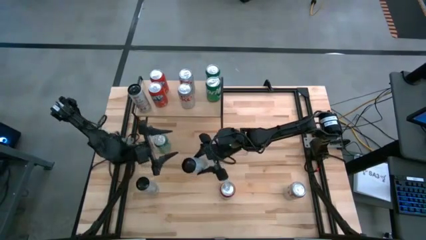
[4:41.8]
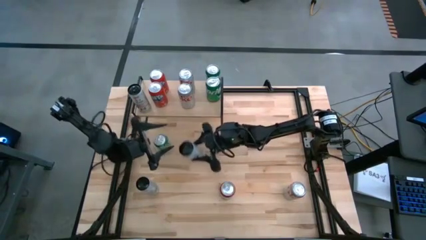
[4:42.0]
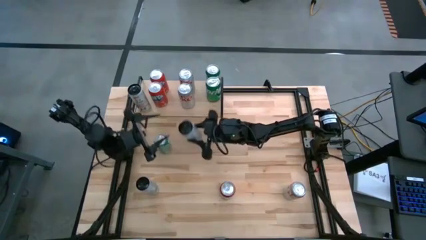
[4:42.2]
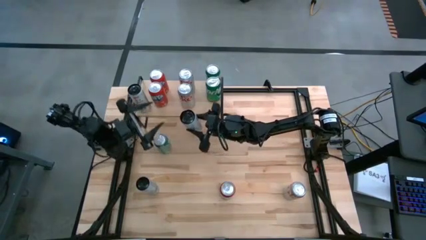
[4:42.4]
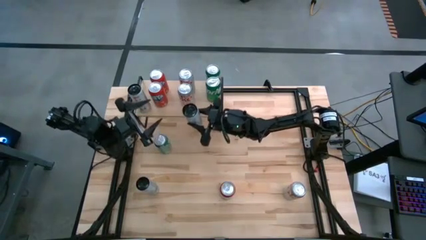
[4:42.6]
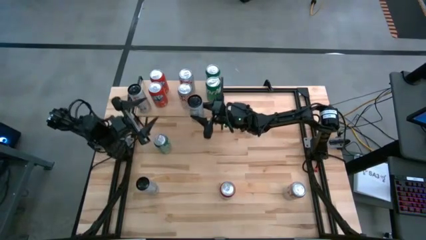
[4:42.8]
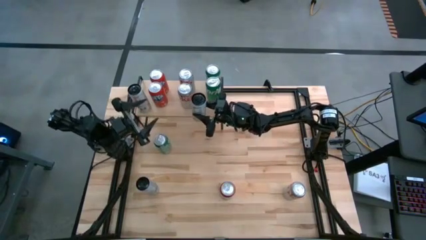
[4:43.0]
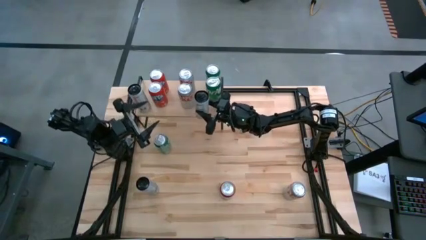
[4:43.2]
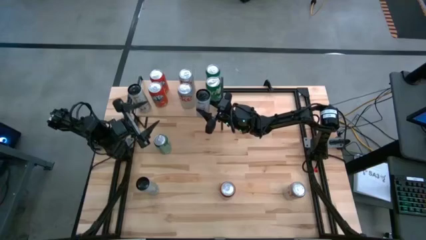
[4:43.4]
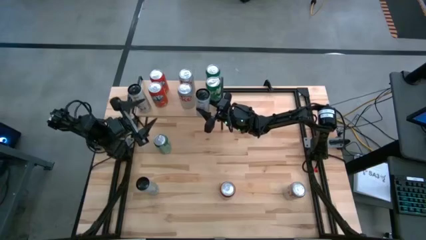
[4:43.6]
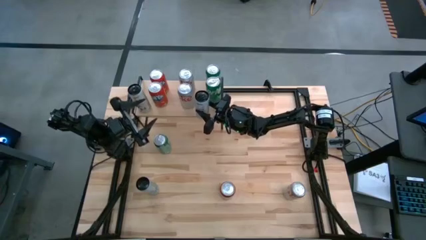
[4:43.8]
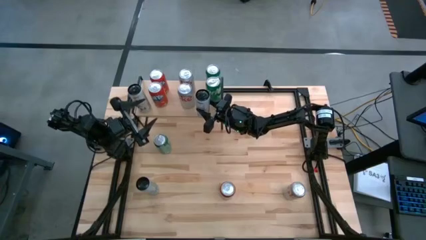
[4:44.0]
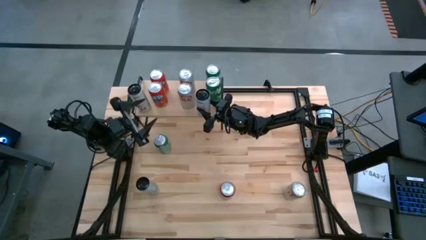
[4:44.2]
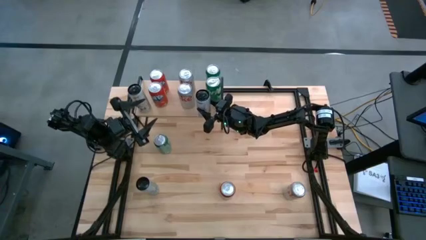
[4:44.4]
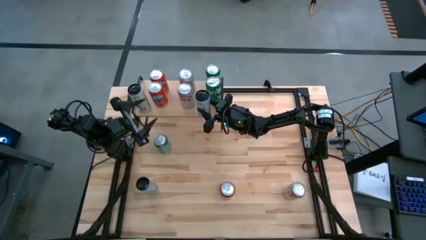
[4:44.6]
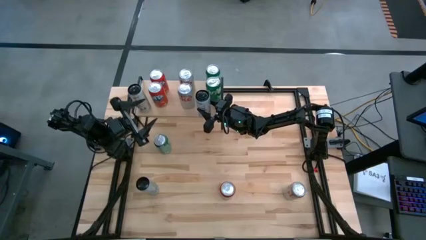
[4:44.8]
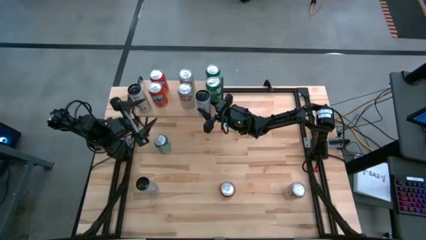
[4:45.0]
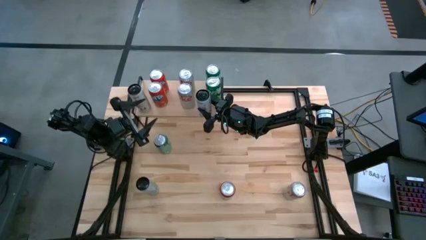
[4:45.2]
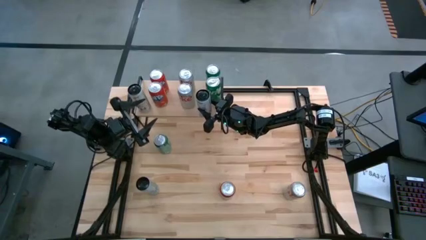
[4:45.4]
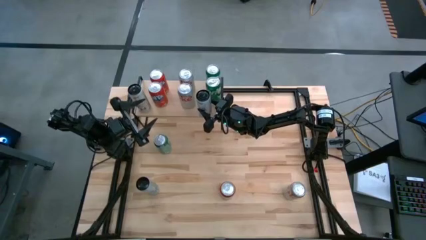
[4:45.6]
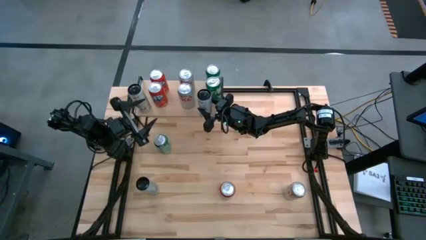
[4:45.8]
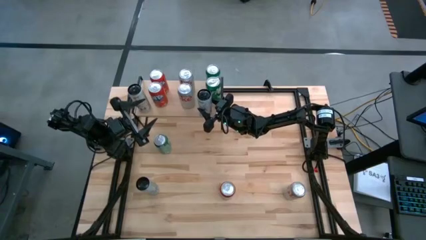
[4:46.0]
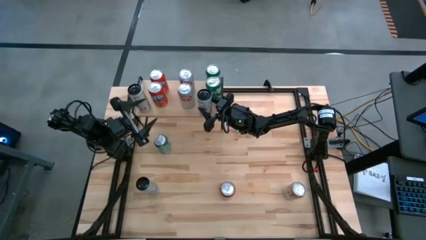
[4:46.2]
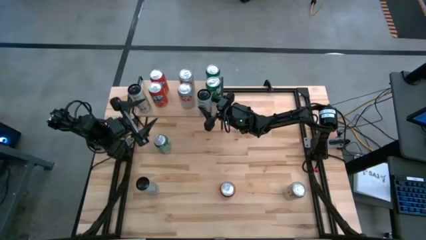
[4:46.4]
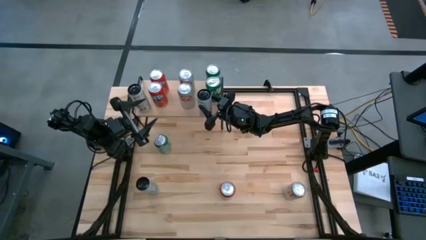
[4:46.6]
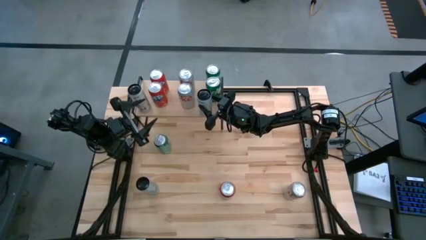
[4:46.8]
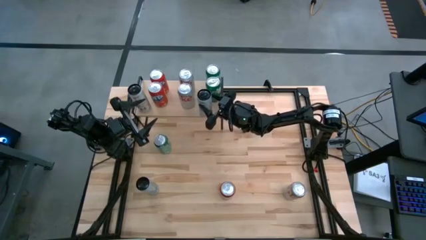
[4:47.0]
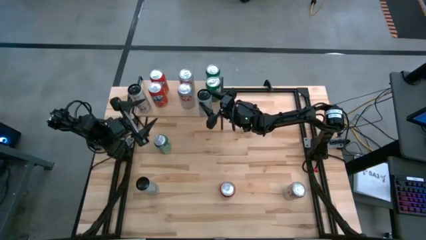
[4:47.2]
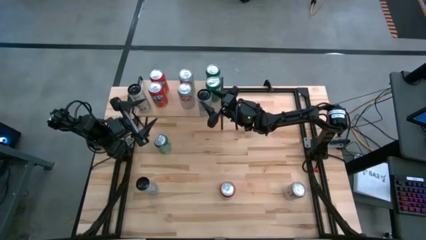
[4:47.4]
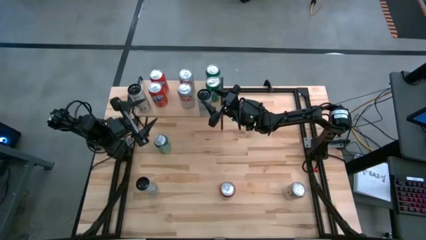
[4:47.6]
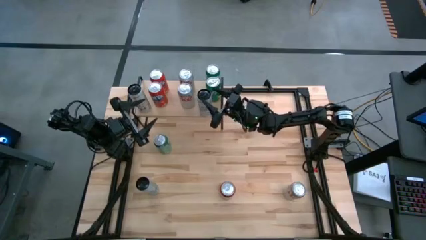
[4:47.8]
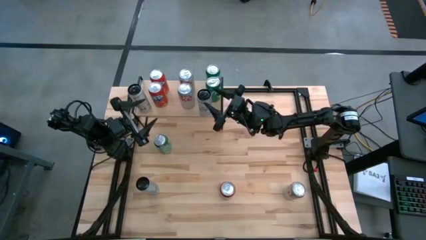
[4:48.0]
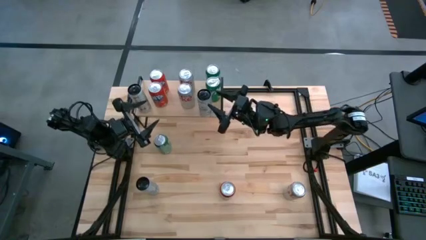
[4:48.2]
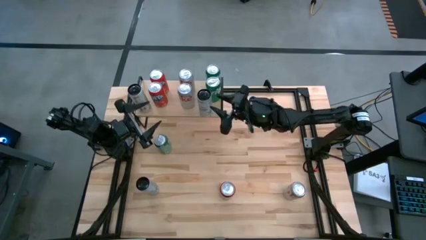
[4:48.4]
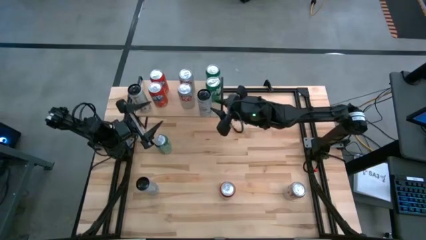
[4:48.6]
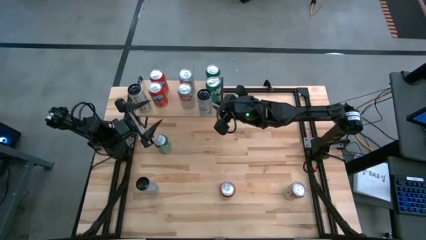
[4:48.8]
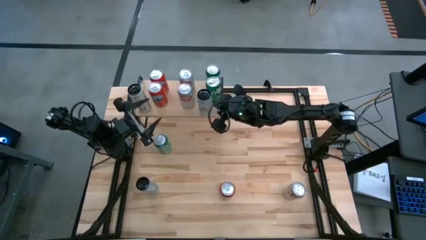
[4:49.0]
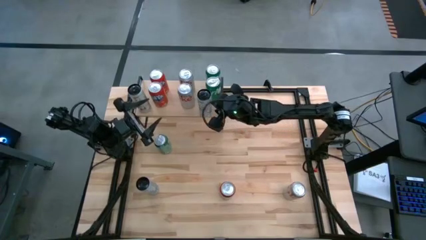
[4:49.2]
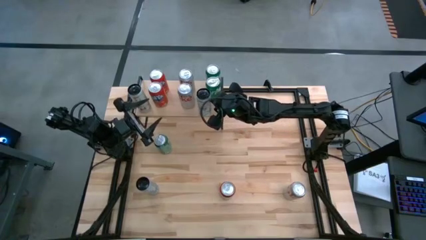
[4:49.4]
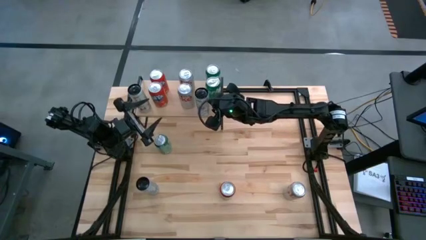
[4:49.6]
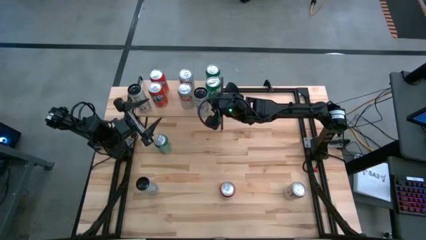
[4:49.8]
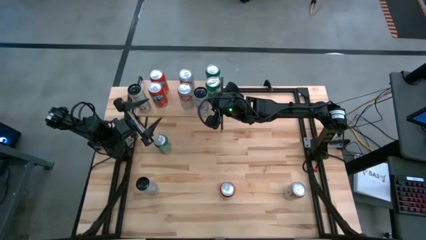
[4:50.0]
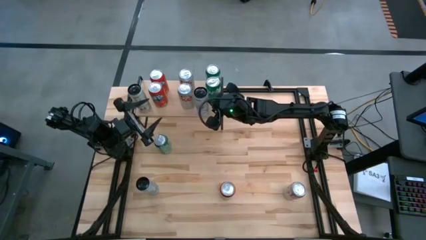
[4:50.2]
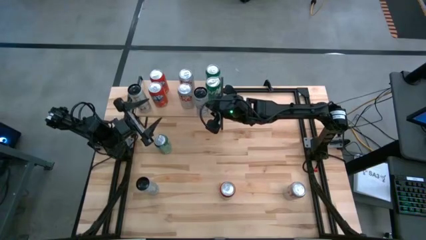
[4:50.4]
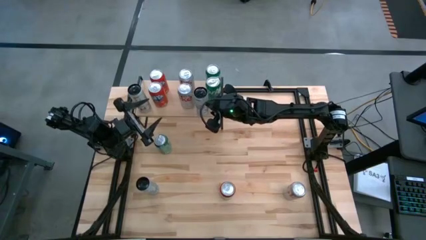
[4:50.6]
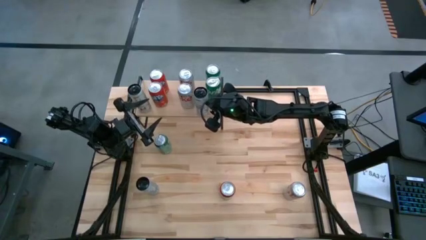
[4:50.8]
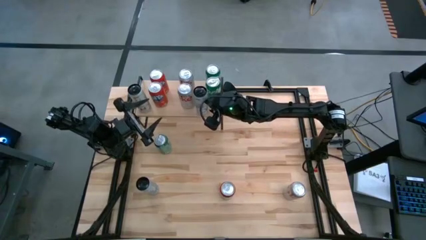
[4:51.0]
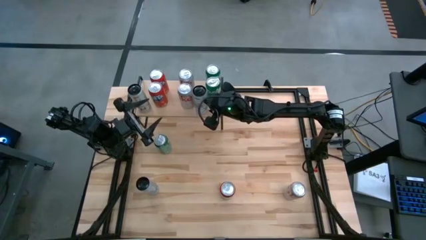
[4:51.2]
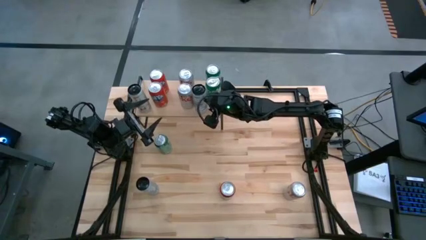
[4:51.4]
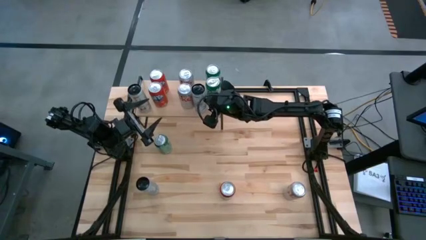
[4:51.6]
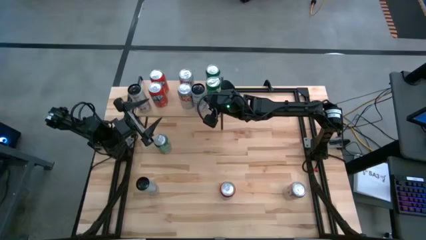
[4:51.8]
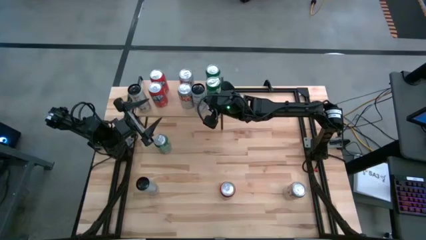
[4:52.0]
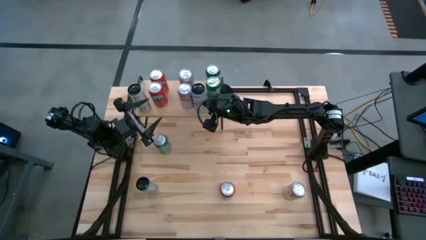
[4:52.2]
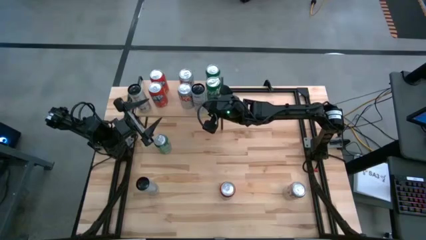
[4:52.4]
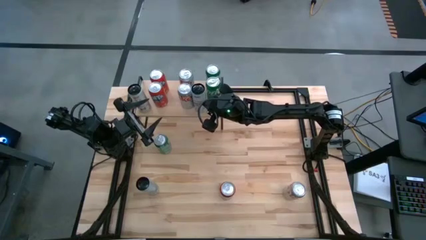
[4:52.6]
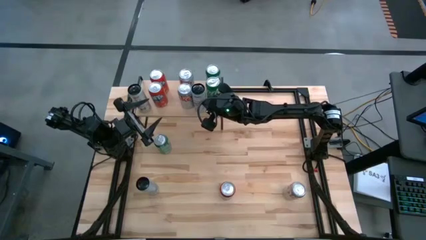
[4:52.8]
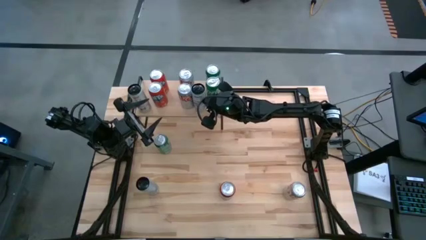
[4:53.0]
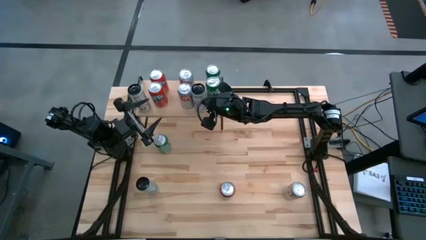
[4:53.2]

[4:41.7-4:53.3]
Task: Place canned beverage on shelf
Put the right white and blue soda can on the shelf

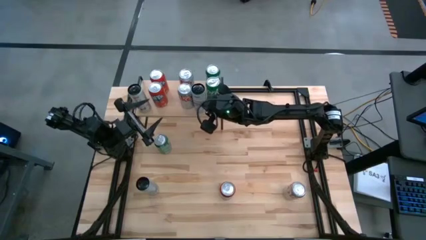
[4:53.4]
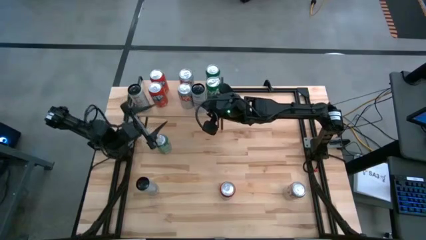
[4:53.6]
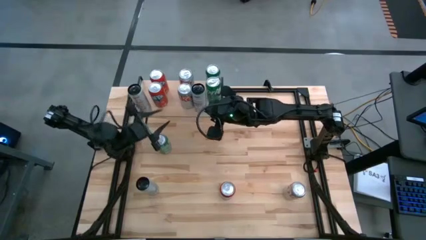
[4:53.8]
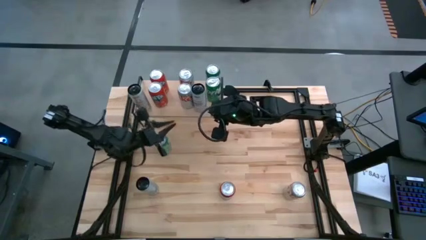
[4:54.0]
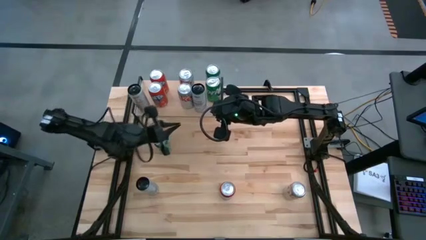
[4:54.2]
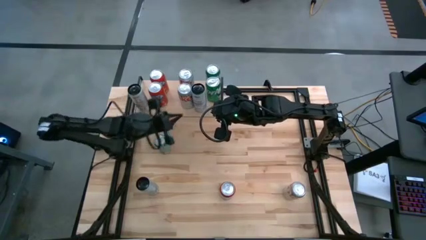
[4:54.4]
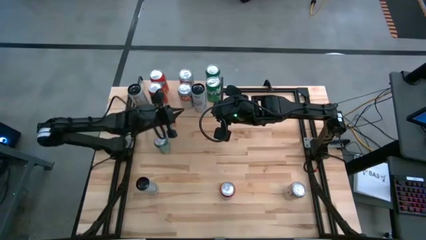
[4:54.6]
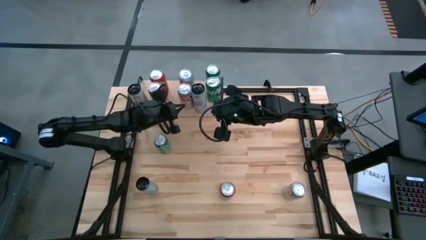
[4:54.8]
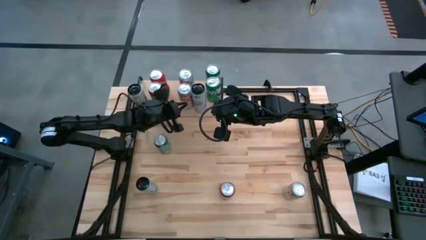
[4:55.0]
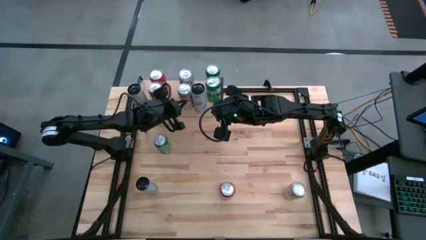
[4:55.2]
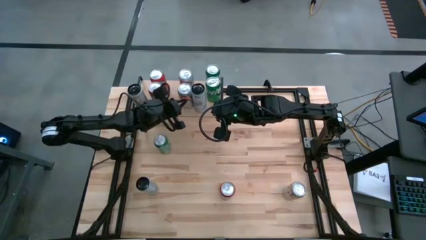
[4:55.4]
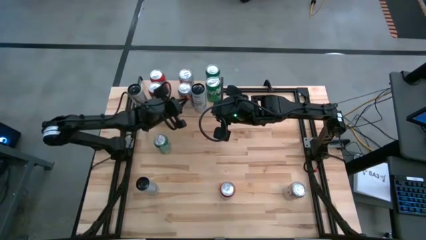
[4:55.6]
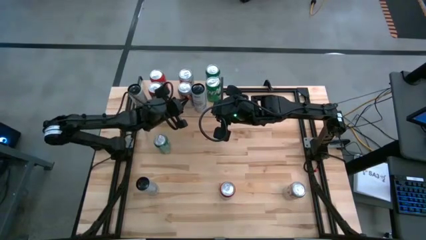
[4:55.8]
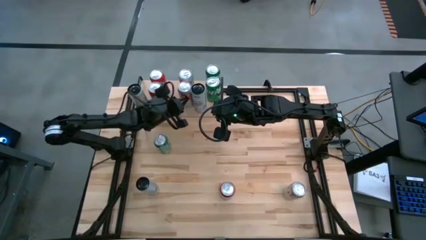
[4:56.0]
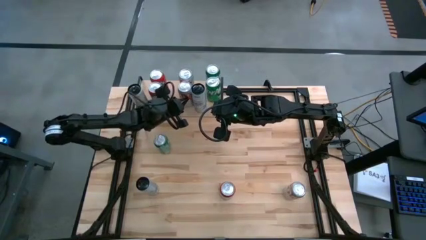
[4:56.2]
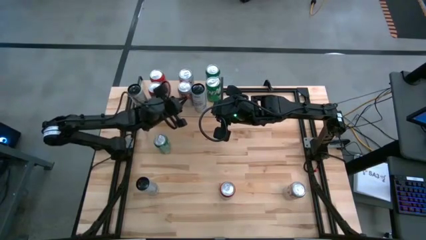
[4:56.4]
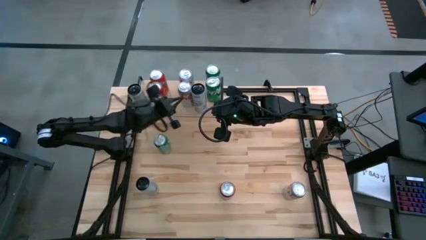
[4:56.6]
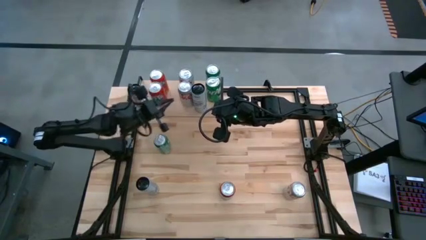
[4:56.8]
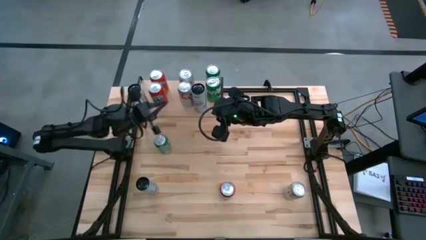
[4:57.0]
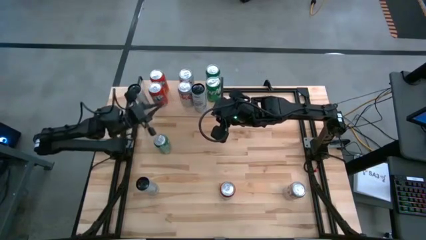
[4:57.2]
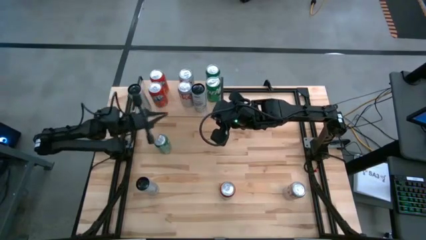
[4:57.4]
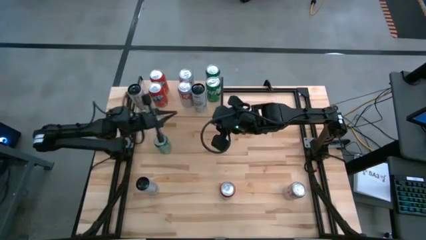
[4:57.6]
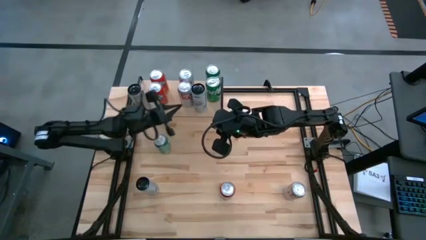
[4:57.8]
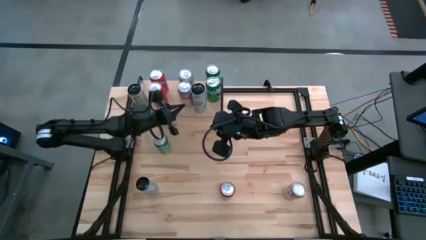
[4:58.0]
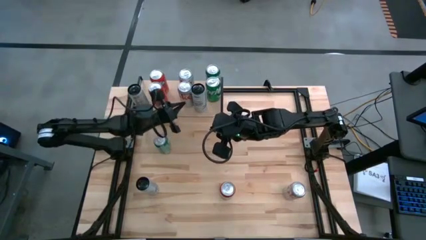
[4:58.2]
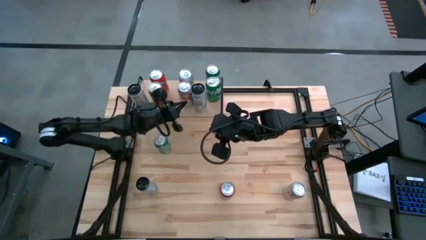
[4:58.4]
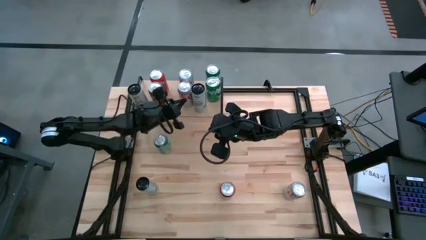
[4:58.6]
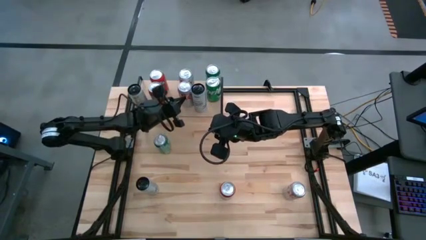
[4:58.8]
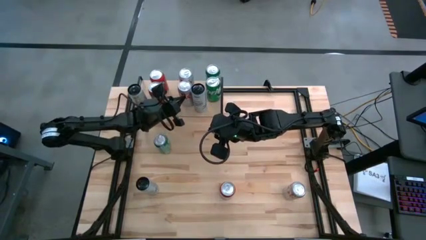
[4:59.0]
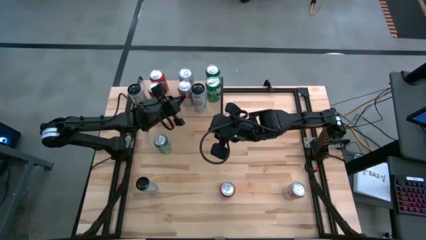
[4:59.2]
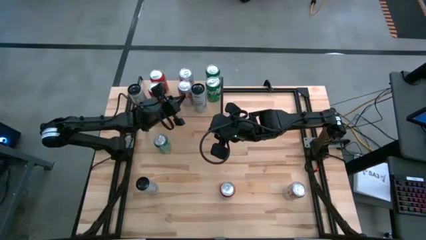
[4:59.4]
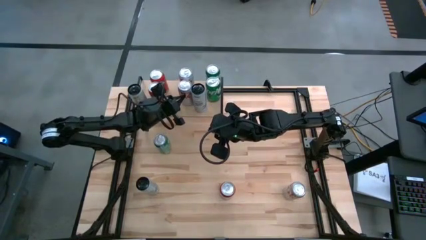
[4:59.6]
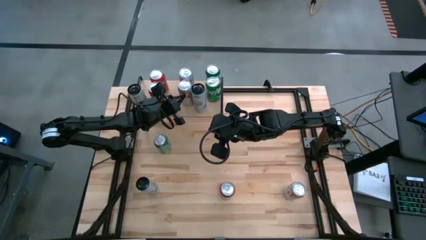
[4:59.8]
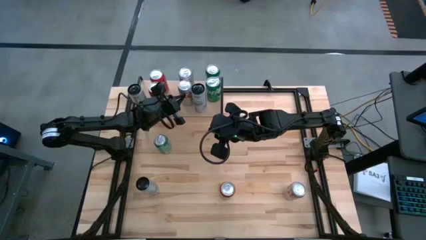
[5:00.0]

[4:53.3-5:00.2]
Adjust the silver soda can on the shelf
